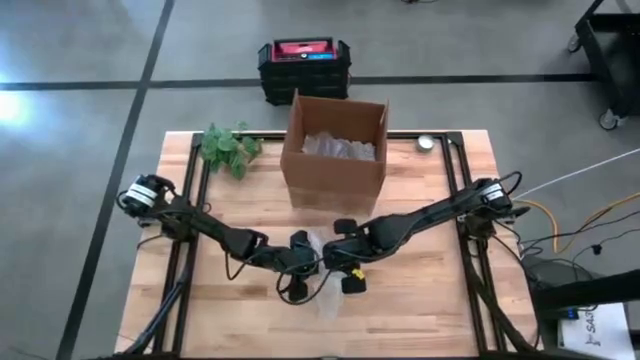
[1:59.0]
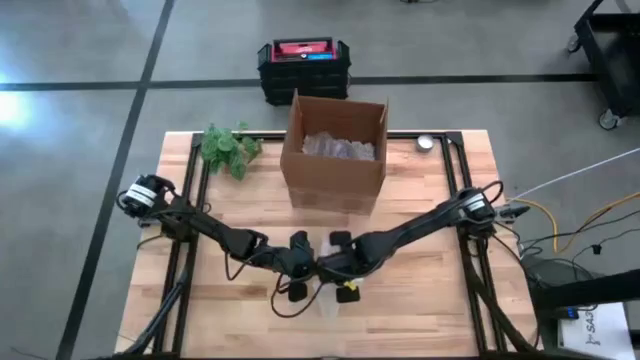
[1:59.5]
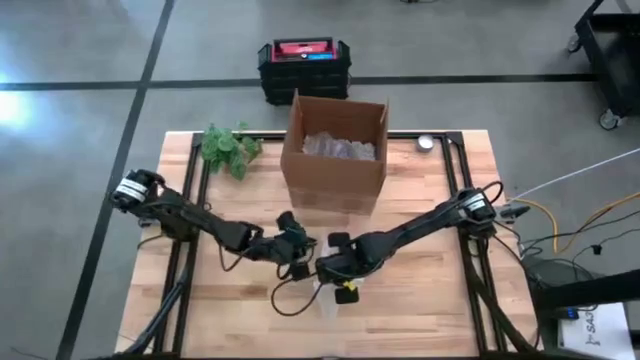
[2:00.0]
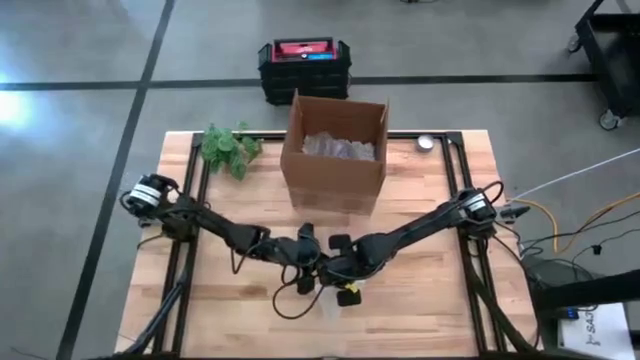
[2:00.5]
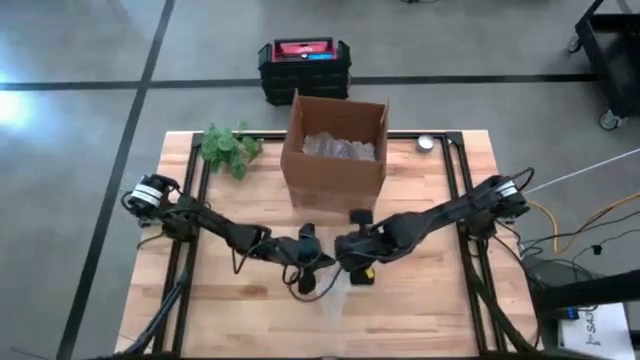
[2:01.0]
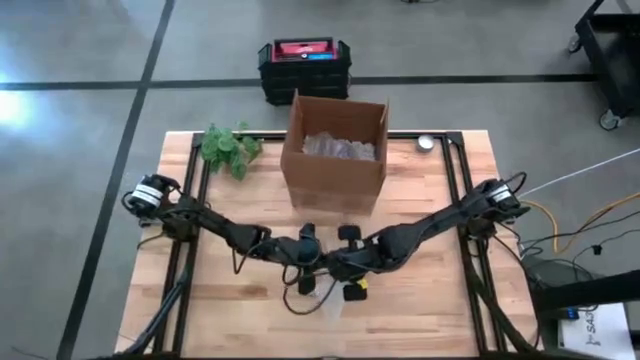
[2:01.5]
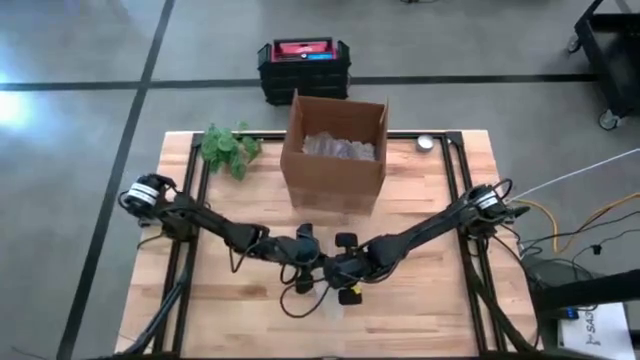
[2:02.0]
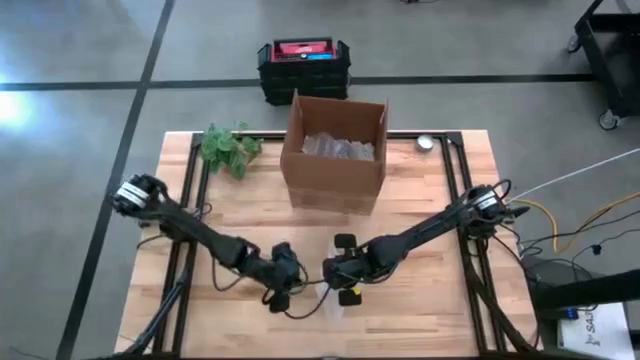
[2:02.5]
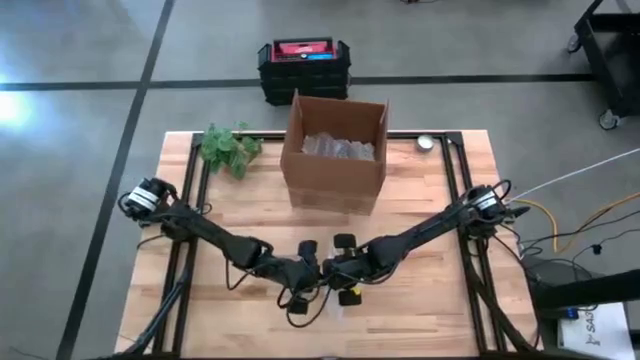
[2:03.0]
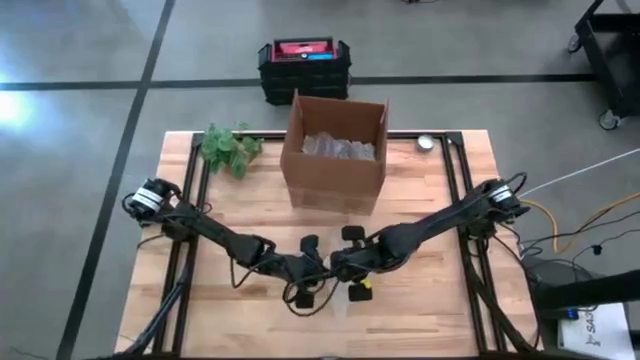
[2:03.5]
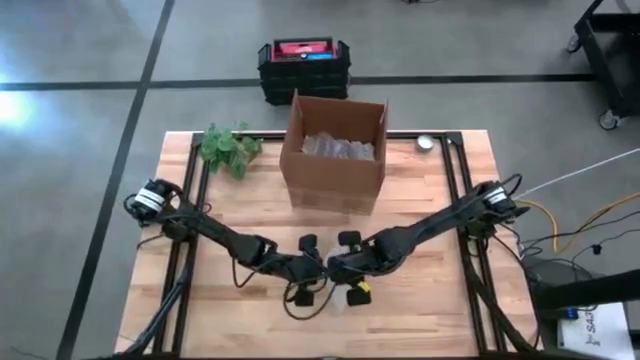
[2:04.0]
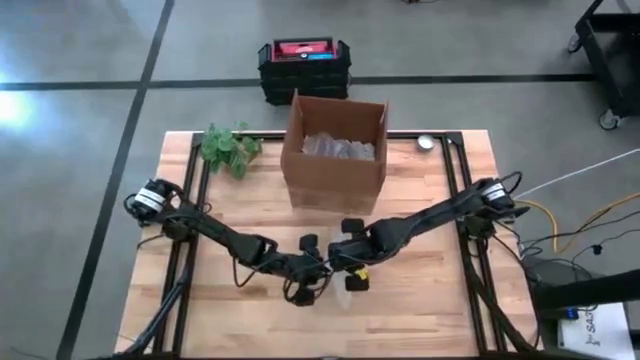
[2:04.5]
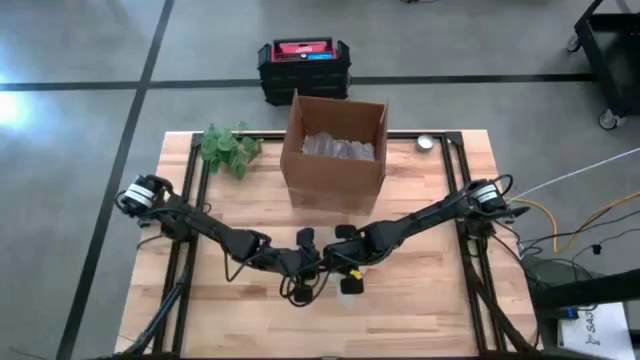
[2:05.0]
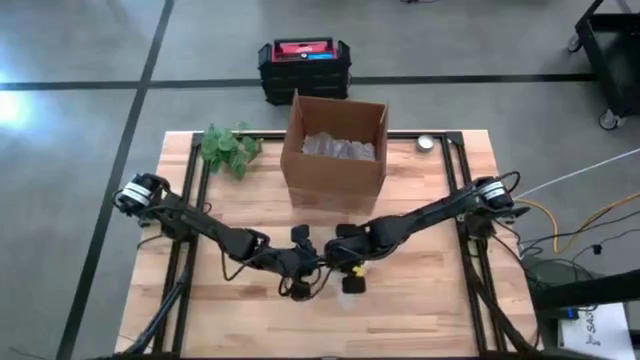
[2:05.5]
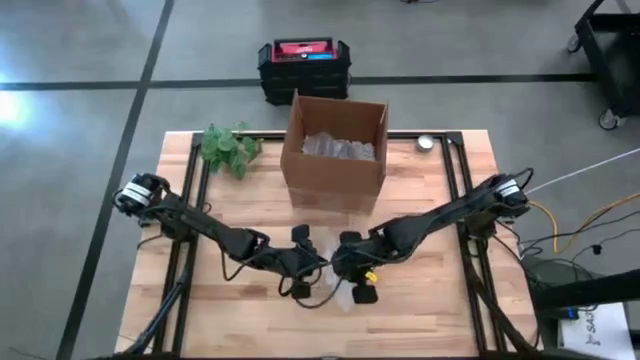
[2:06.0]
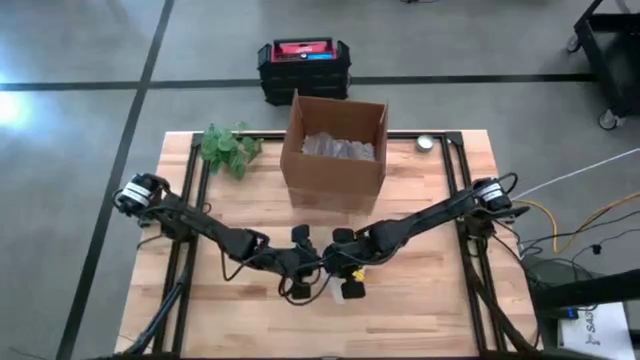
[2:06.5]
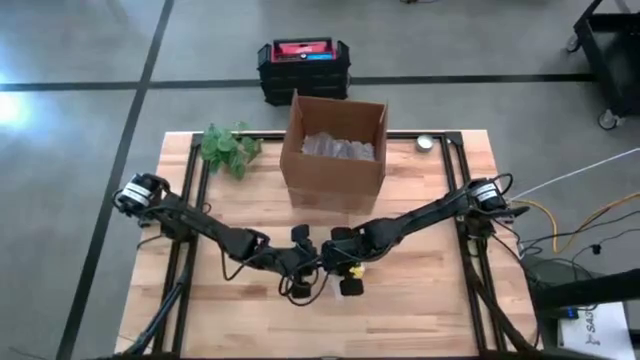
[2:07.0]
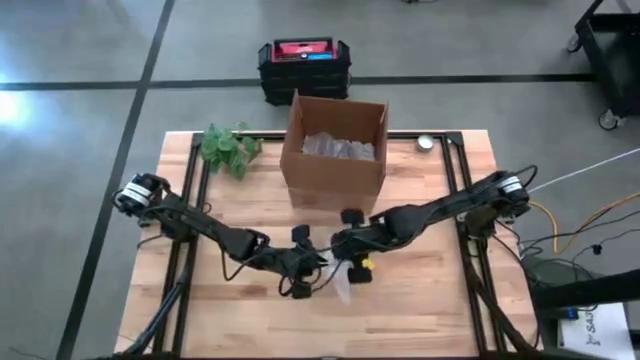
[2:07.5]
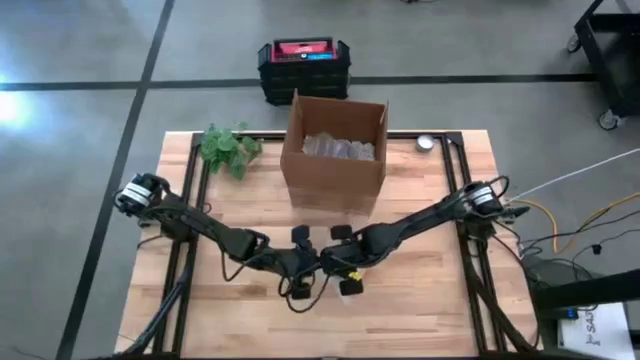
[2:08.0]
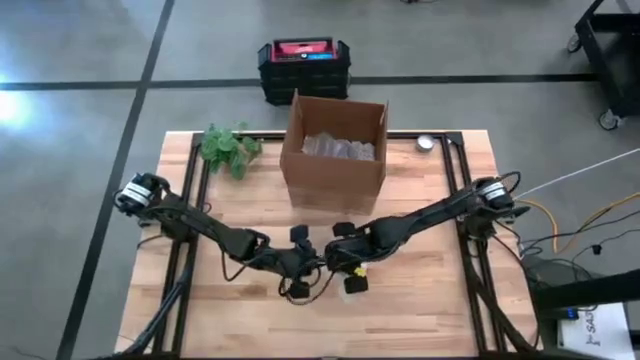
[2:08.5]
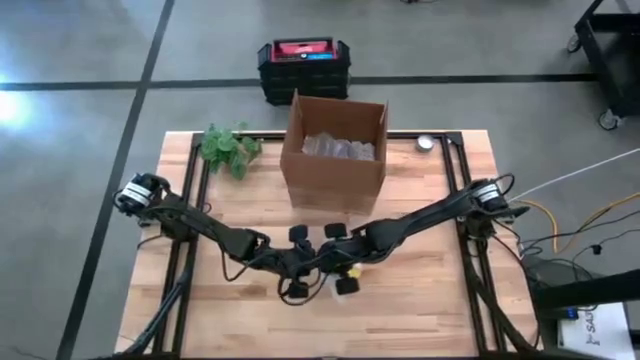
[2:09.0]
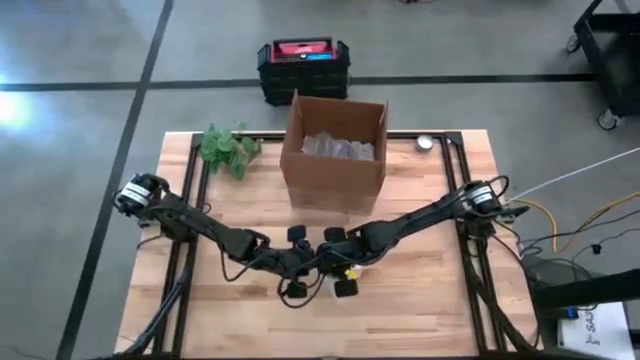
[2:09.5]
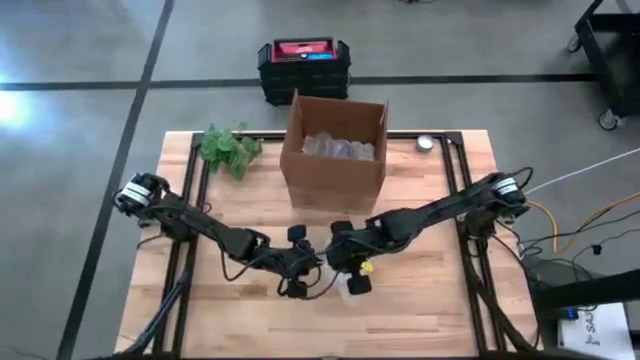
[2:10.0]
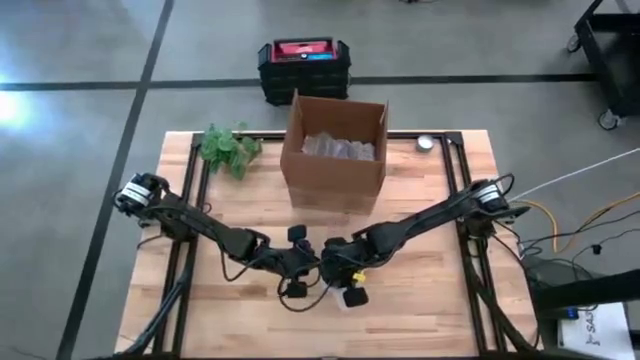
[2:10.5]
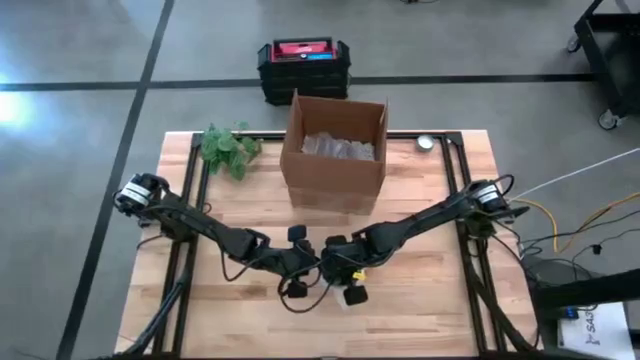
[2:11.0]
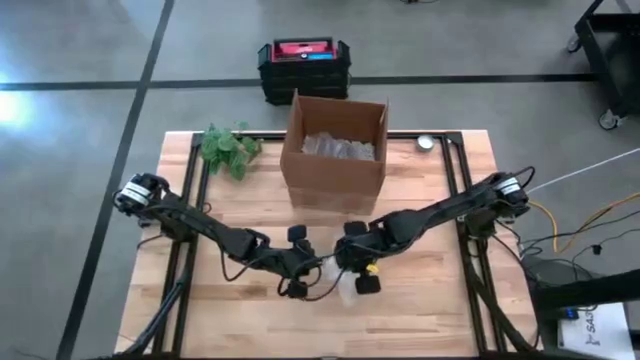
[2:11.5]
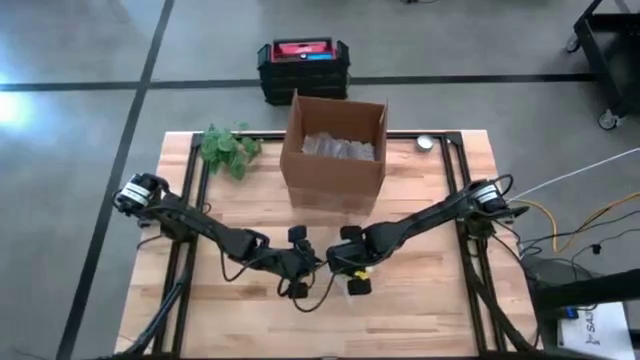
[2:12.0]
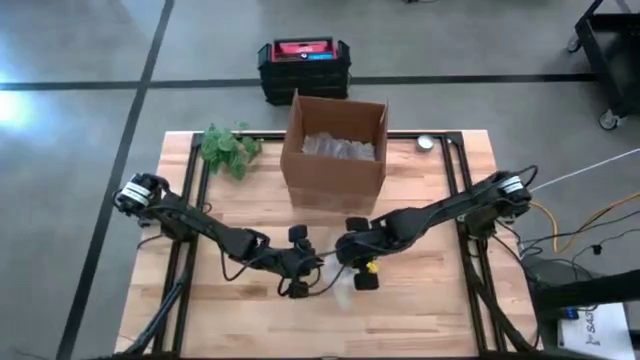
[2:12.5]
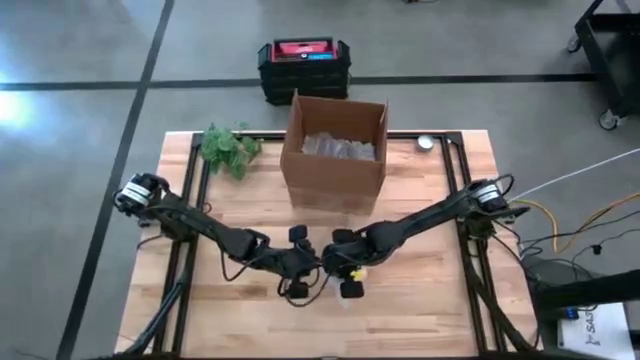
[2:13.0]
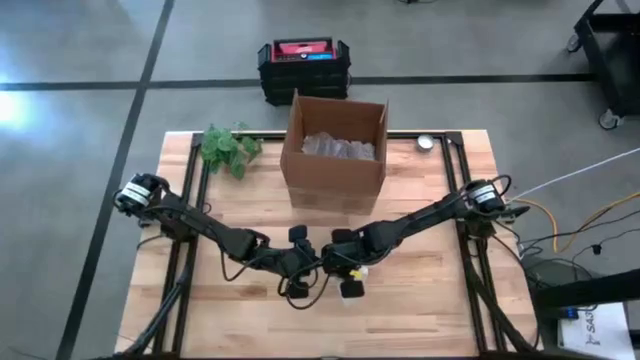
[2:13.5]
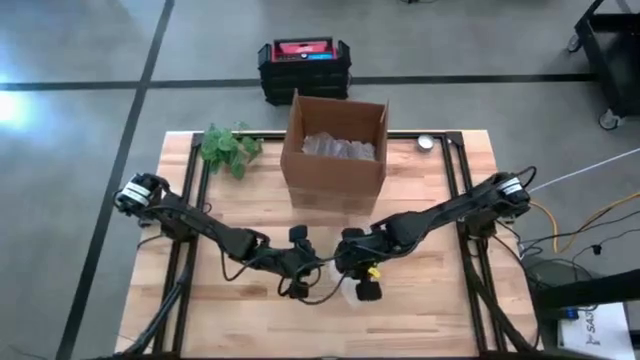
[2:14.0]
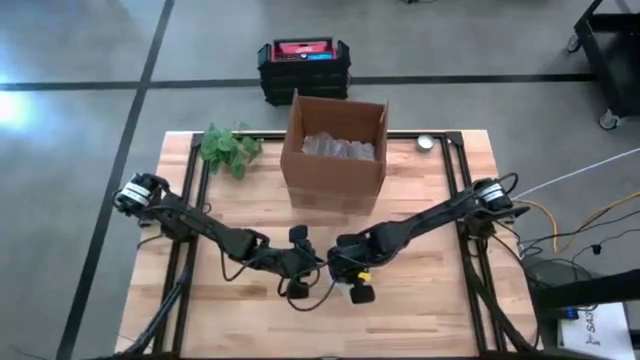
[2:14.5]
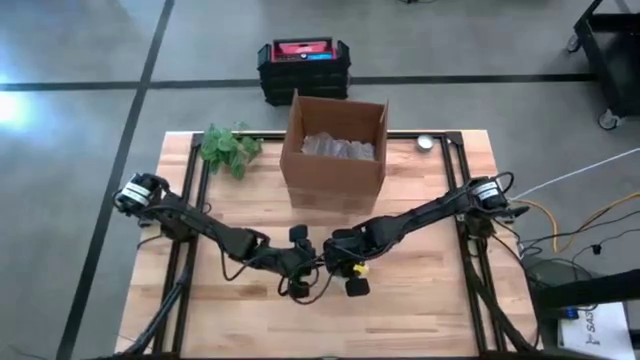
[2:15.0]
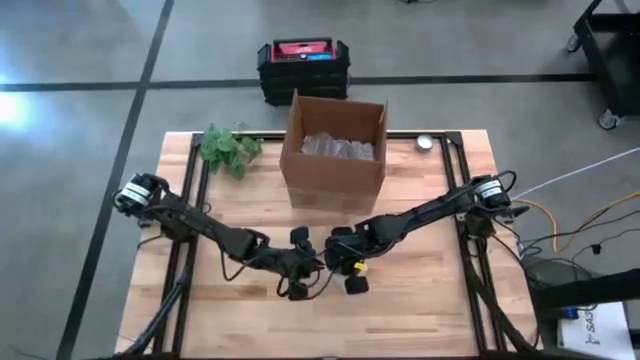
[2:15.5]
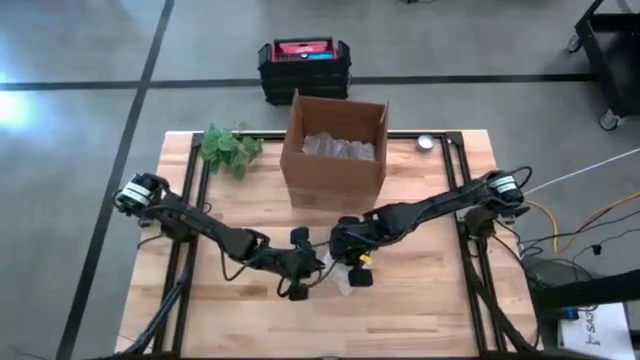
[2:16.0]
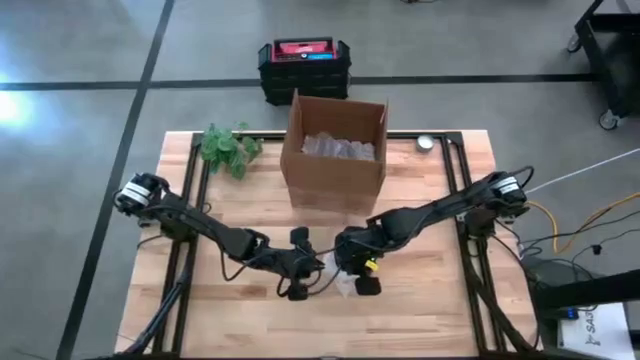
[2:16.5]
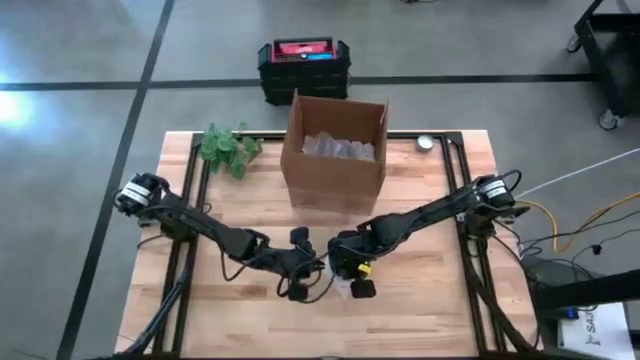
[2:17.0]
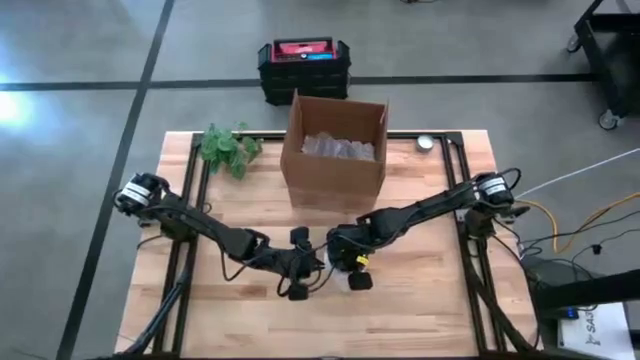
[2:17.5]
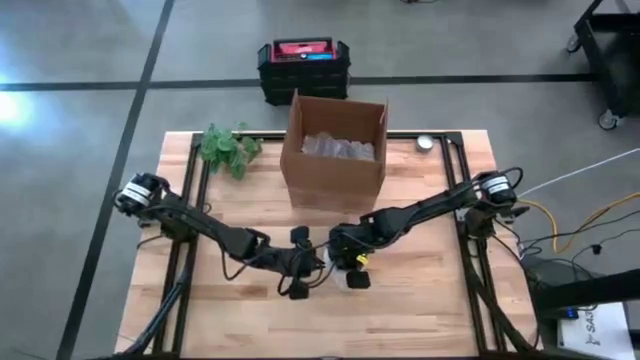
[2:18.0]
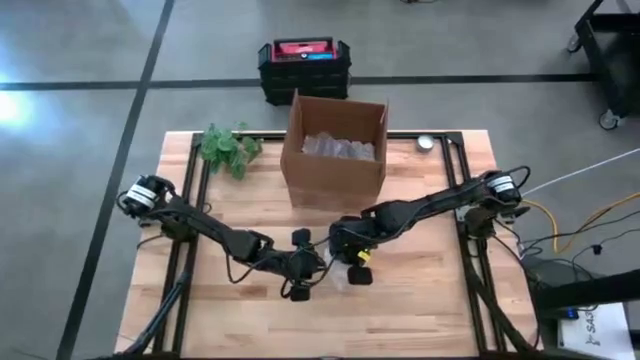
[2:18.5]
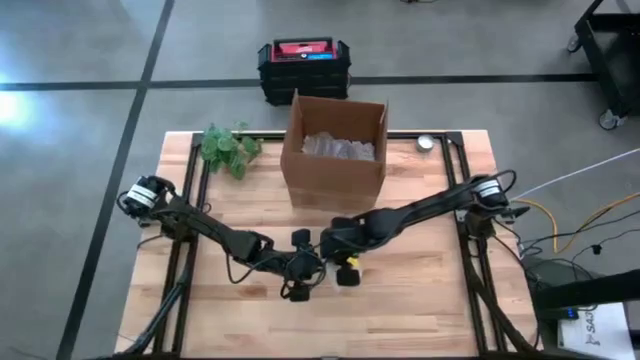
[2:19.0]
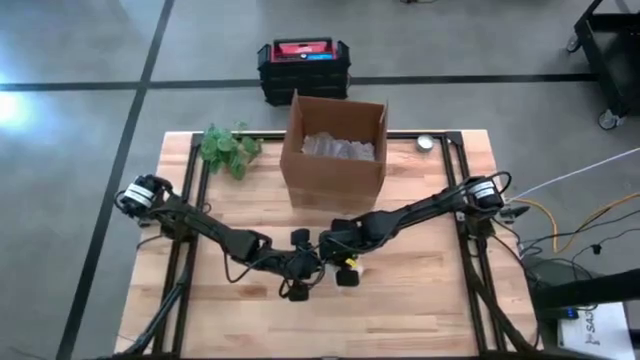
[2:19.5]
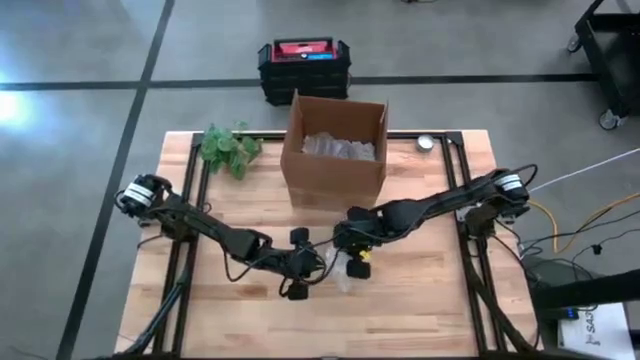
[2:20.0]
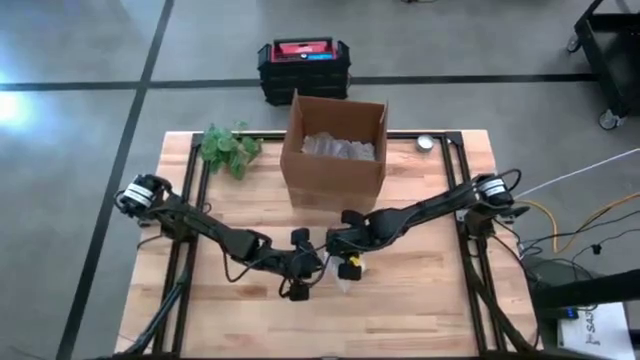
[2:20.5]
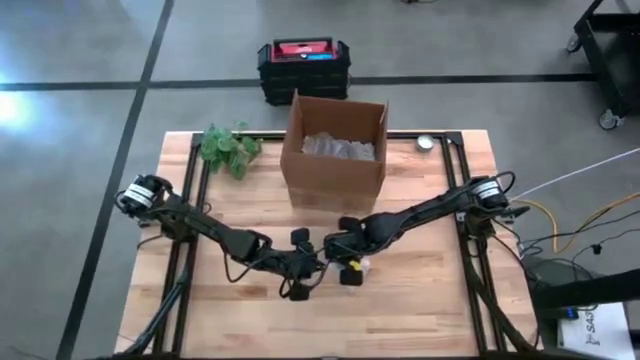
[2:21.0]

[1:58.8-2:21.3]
Task: wrap mug
Wrap the yellow cup in bubble wrap
